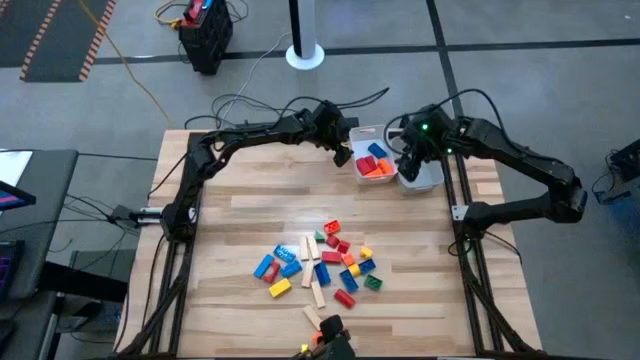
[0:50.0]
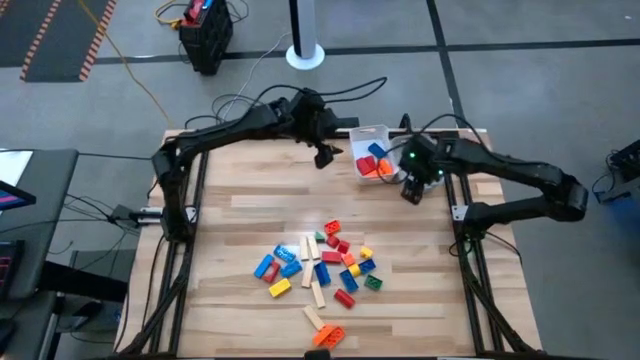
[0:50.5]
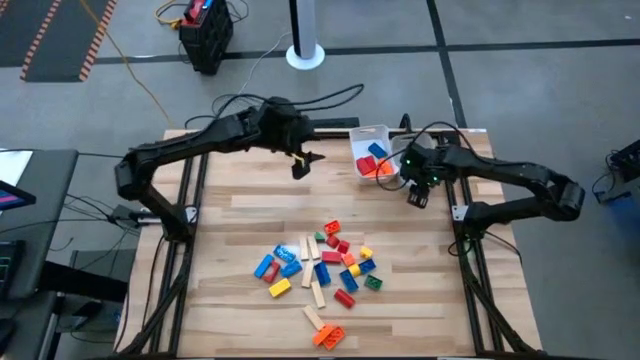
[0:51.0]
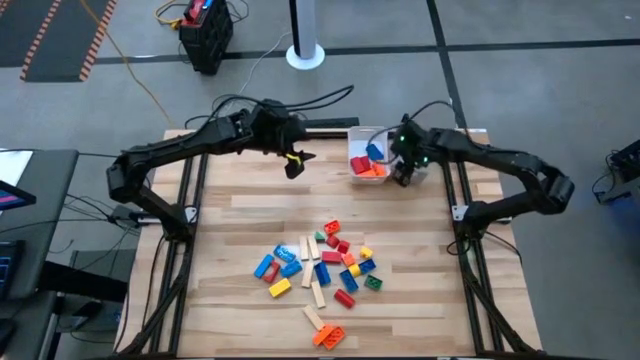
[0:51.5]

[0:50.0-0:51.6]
Task: Sort blocks by size
Adjust the gray bin

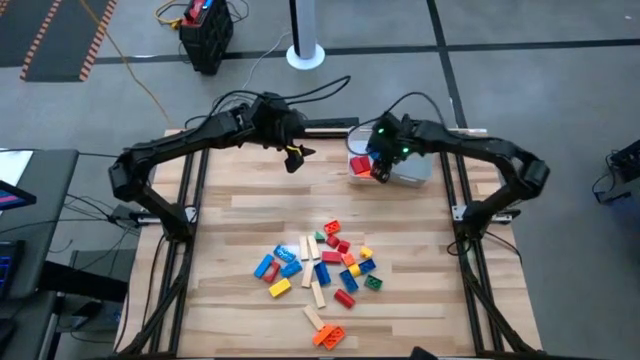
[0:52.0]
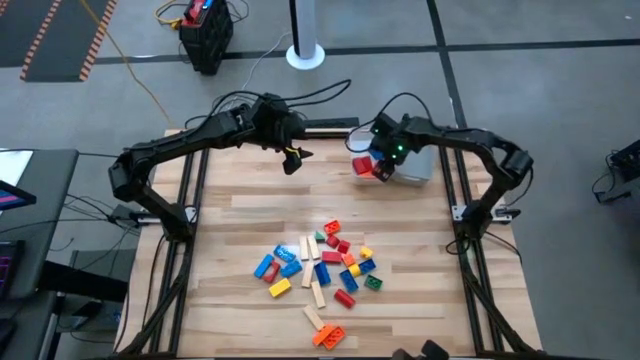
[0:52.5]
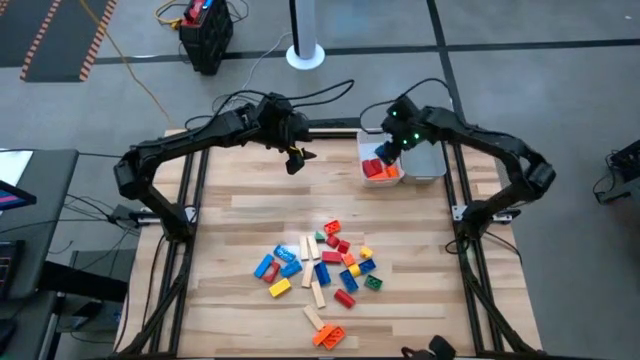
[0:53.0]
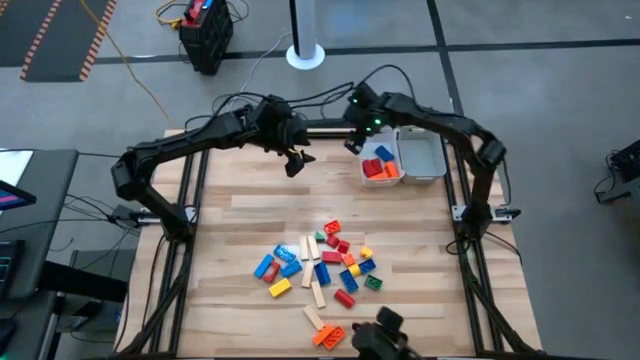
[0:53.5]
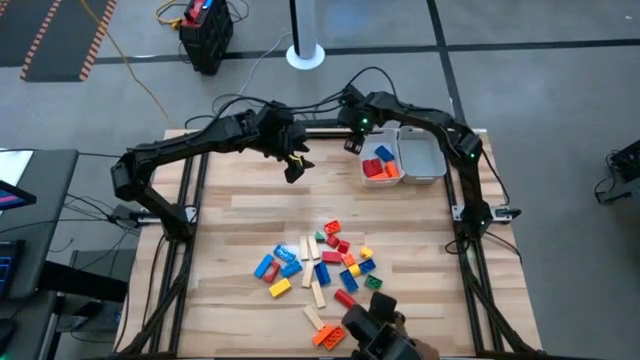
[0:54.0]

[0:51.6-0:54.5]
Adjust the white bin

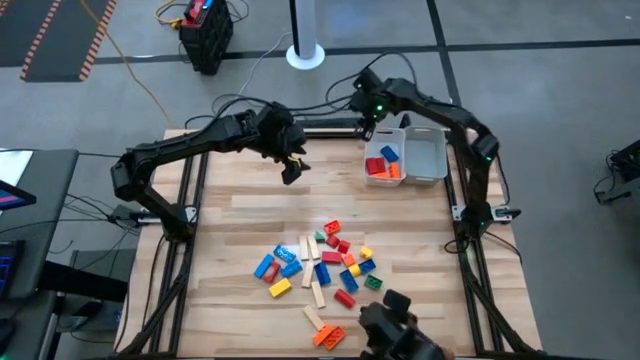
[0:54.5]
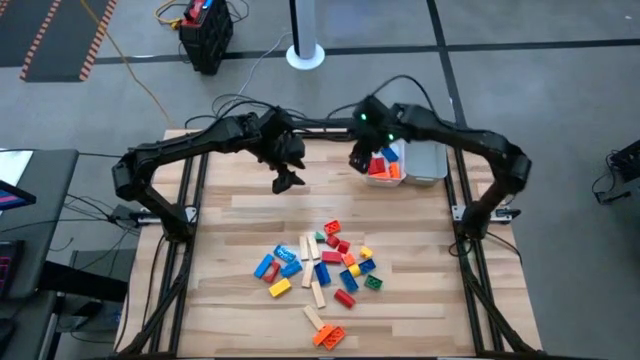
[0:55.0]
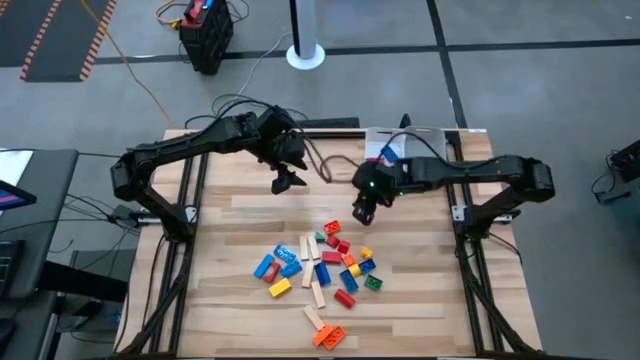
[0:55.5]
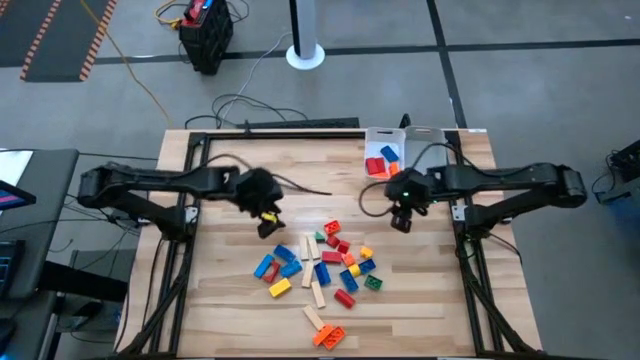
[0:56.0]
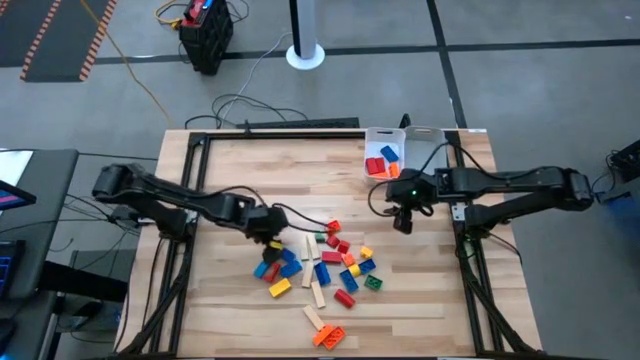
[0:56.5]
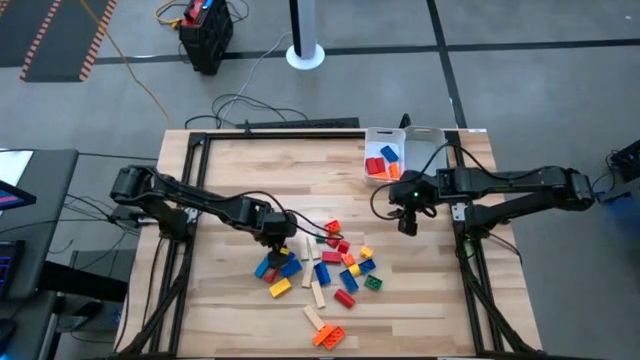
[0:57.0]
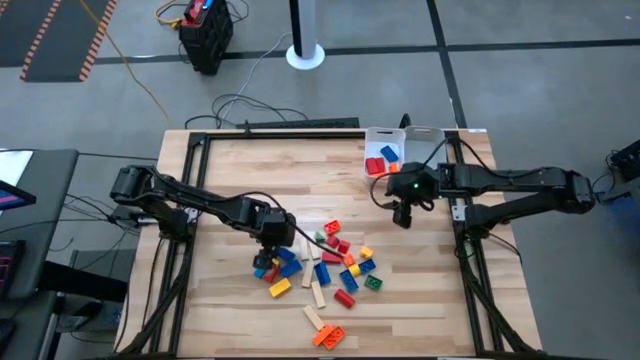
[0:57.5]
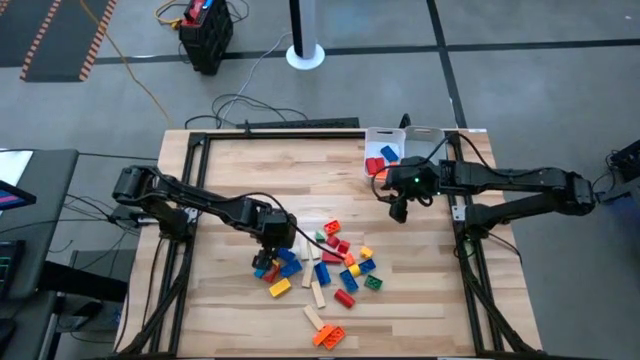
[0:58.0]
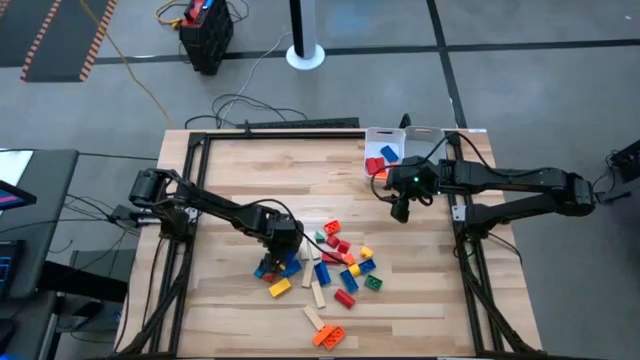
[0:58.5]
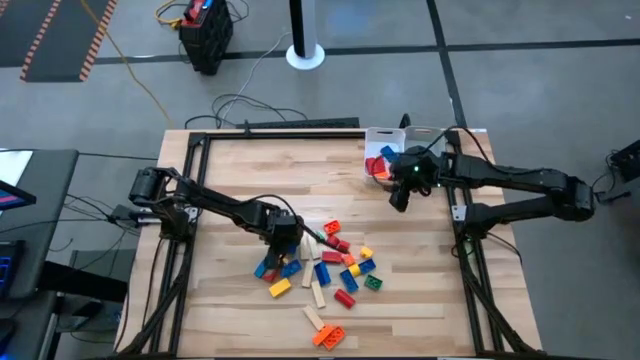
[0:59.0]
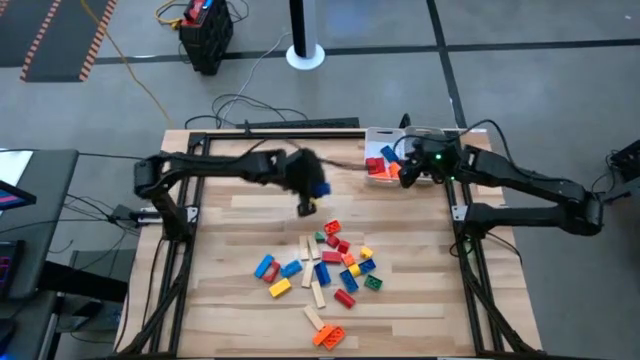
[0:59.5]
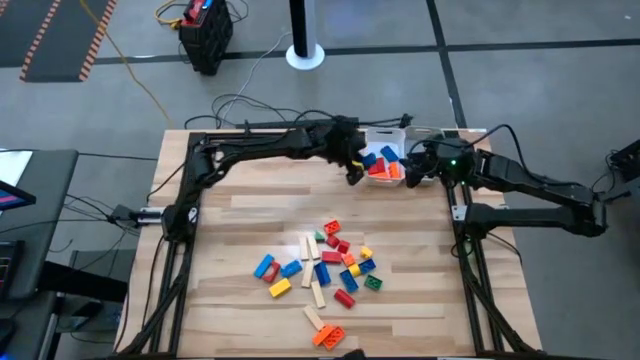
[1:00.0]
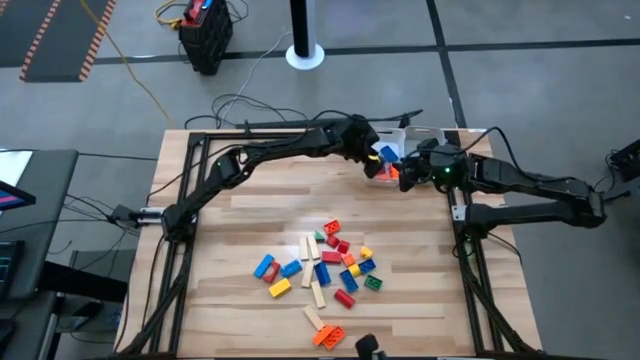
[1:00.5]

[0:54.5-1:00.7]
Put the large blue game piece into the white bin

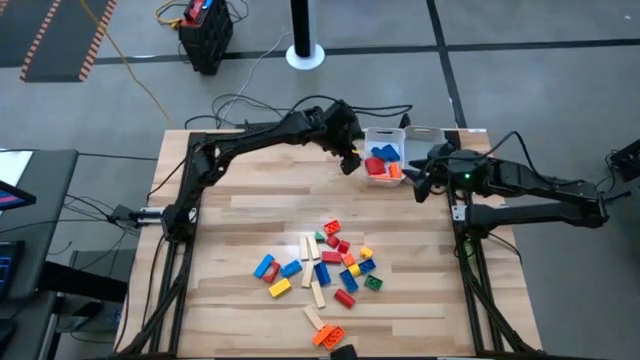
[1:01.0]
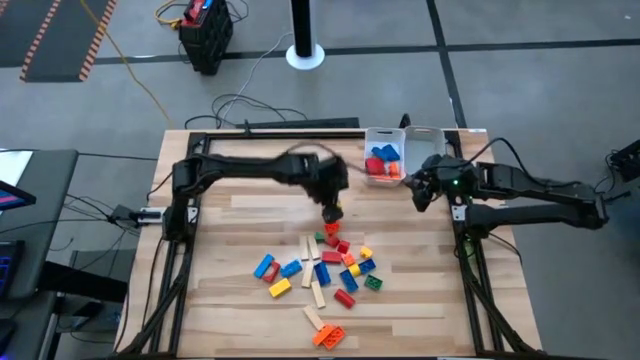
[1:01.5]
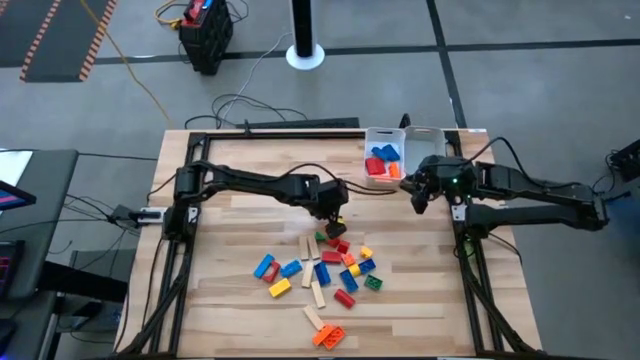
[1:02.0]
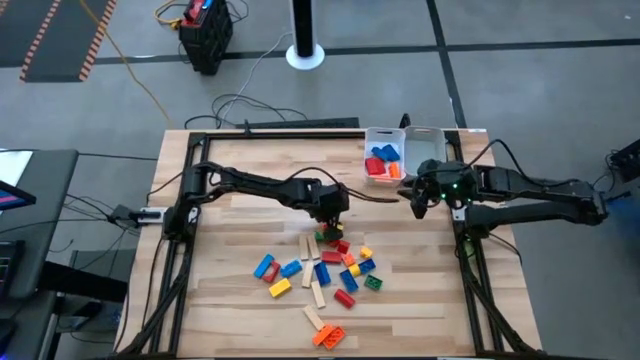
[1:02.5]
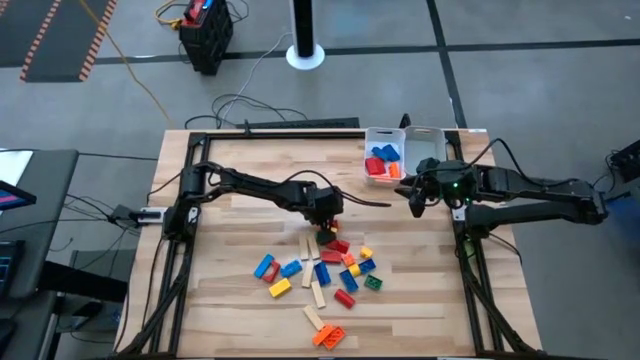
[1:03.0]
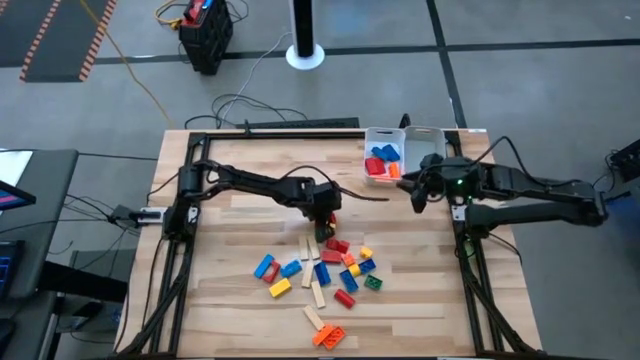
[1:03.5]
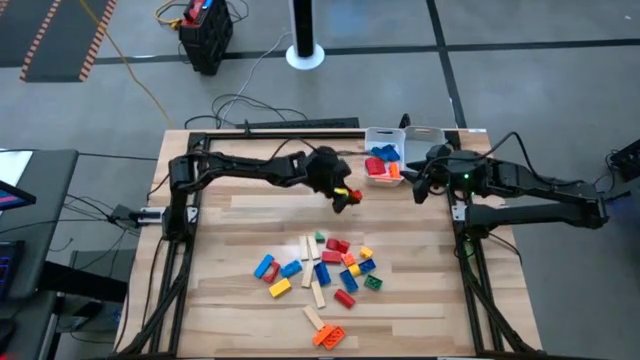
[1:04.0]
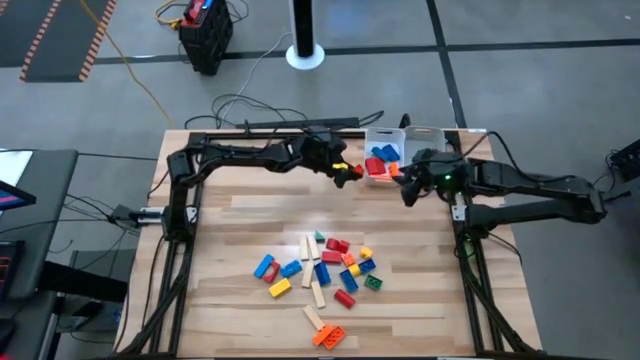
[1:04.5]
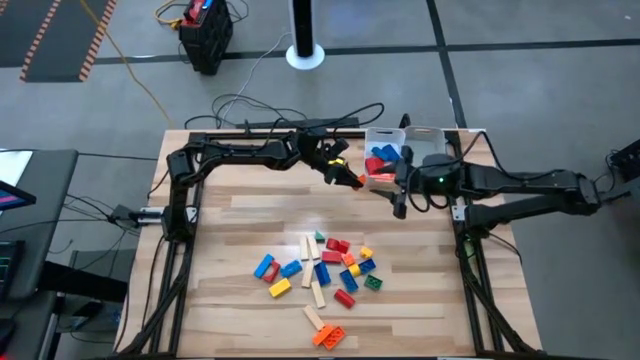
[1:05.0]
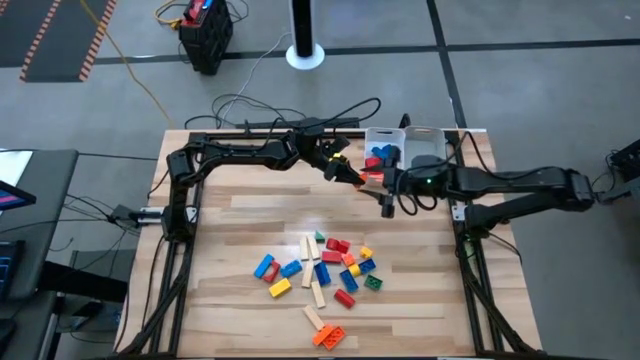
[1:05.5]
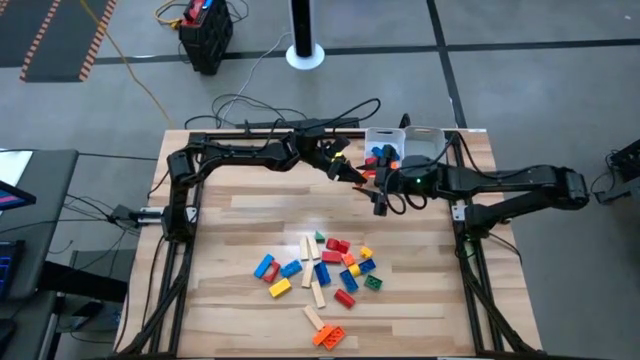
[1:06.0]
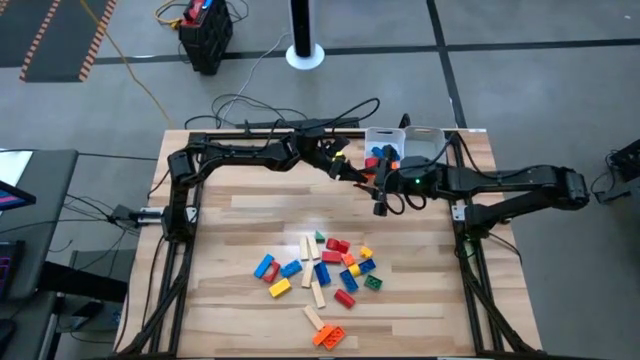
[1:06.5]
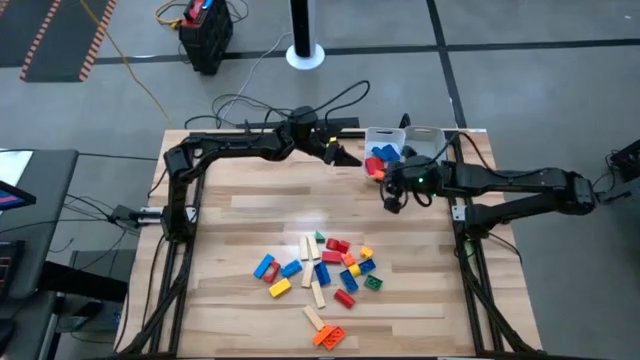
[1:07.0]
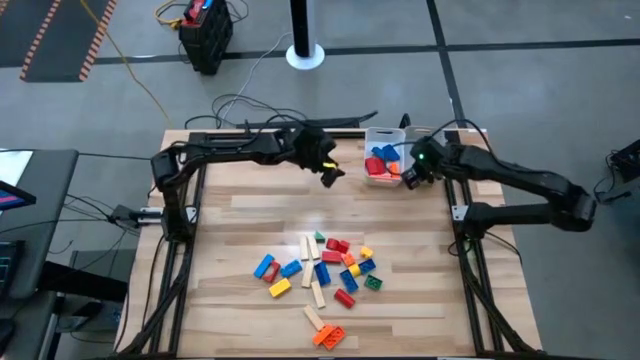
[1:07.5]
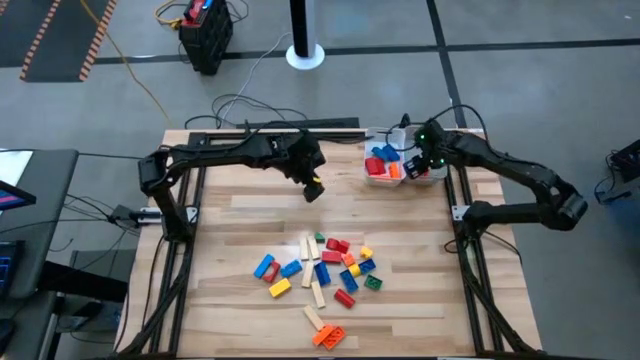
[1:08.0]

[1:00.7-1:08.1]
Put the small orange game piece into the gray bin

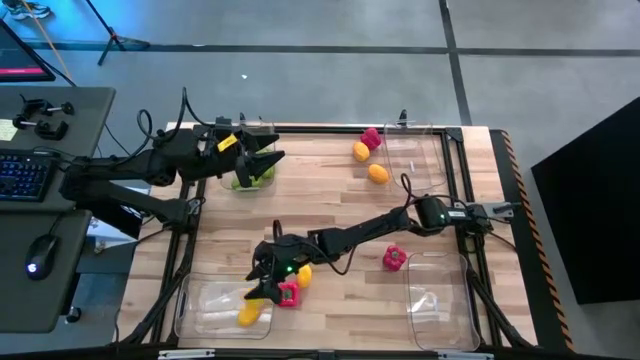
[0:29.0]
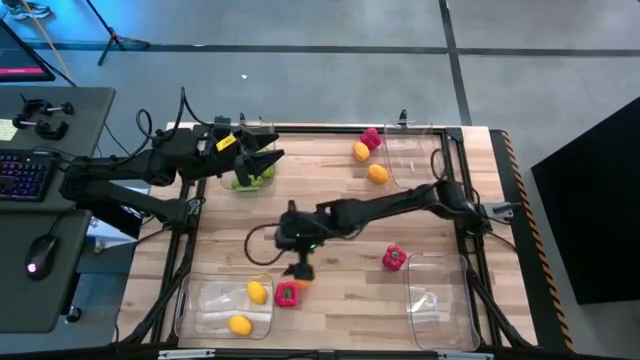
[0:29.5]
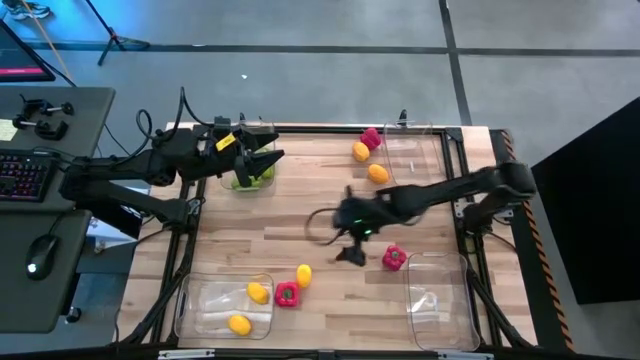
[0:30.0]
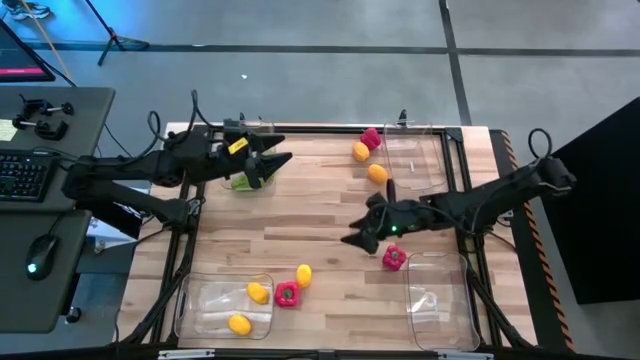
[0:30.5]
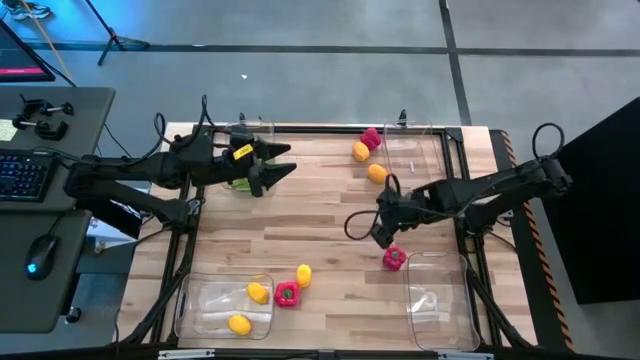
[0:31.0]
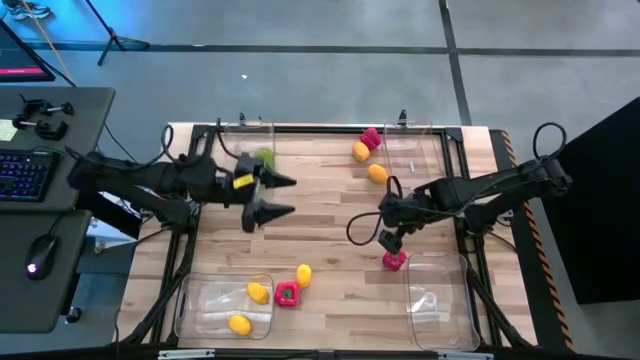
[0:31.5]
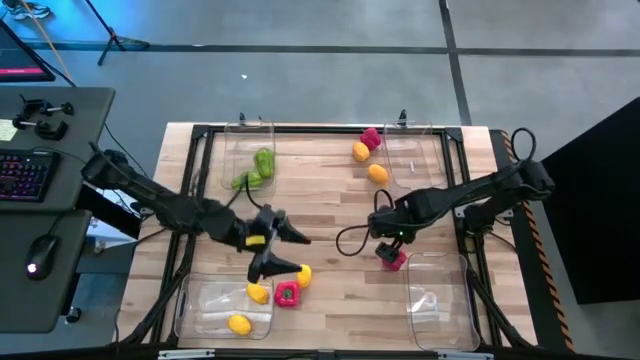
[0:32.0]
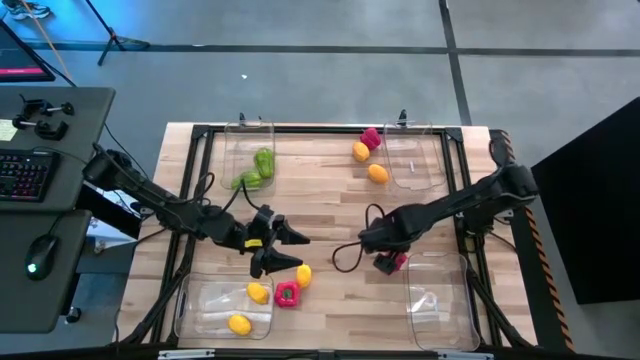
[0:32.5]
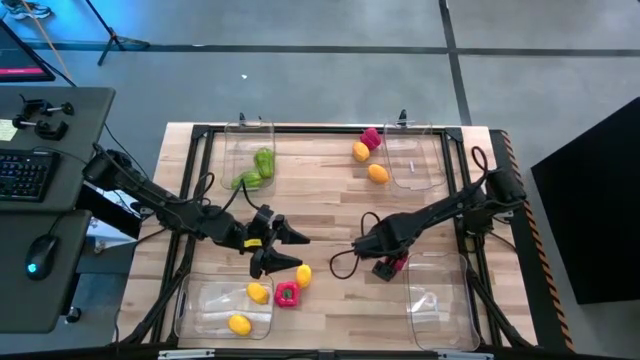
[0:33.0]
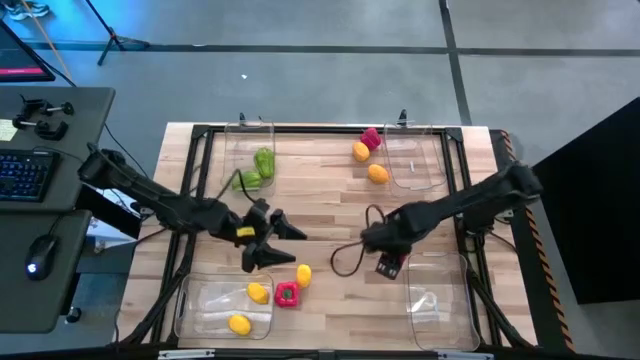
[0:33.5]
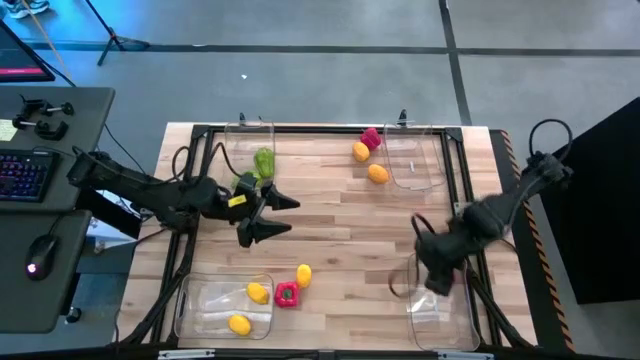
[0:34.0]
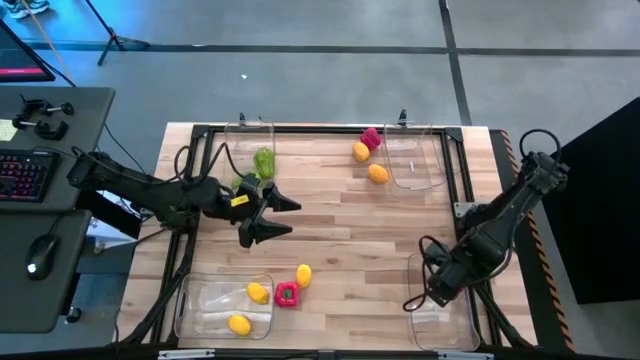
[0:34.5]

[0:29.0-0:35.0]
Task: Sort produce into baskets
Put the bell pepper into the bottom right transparent bin
